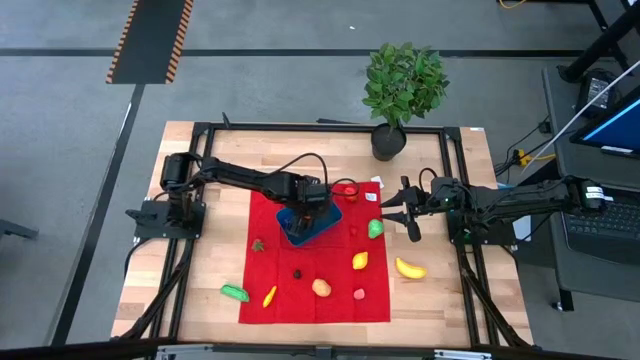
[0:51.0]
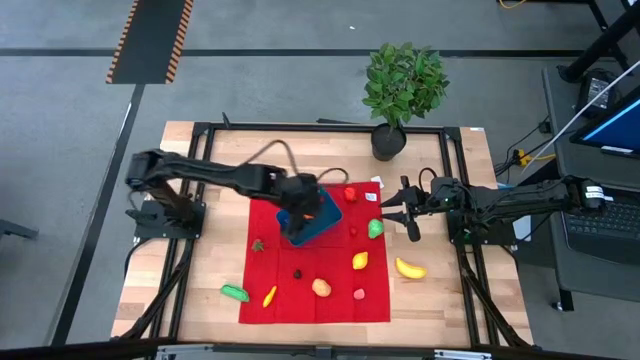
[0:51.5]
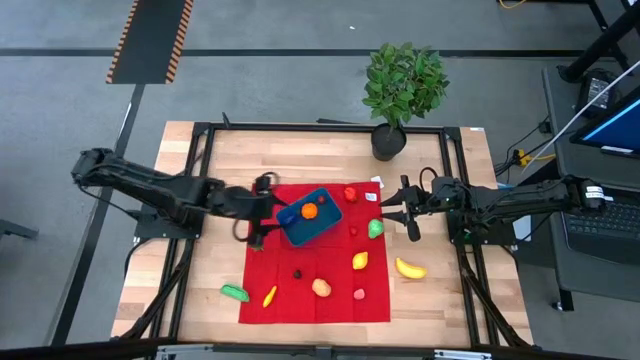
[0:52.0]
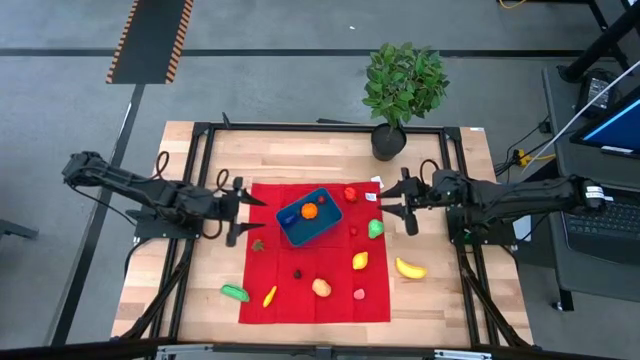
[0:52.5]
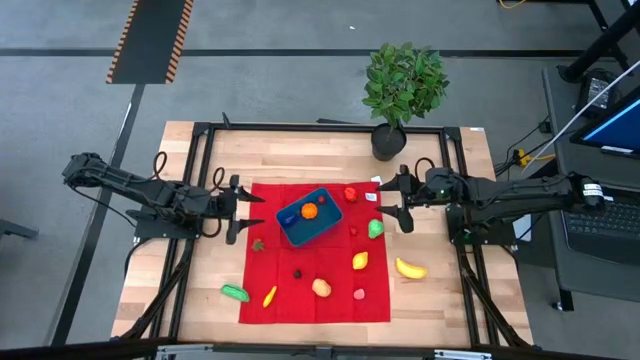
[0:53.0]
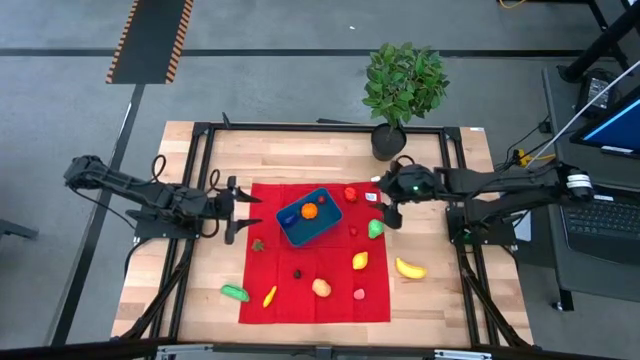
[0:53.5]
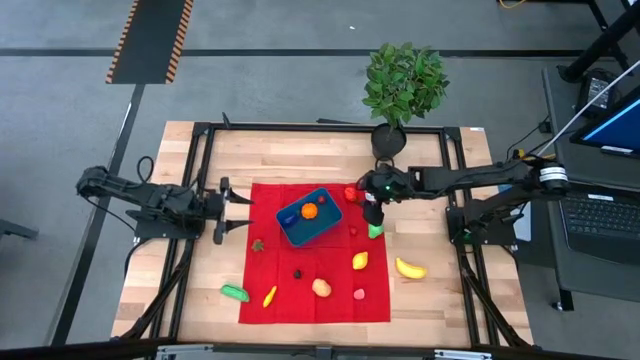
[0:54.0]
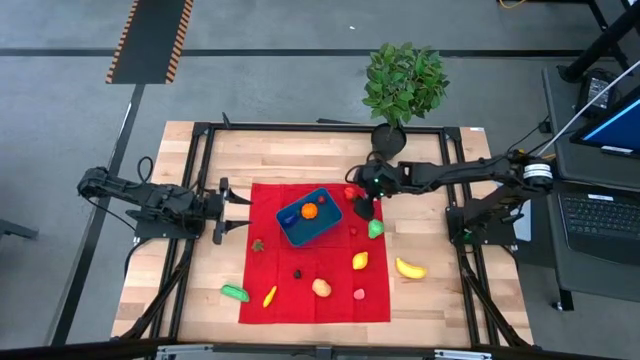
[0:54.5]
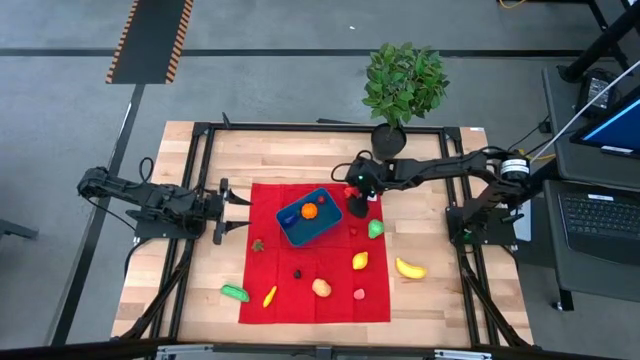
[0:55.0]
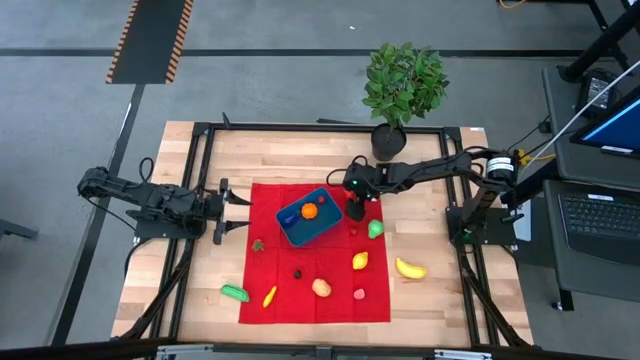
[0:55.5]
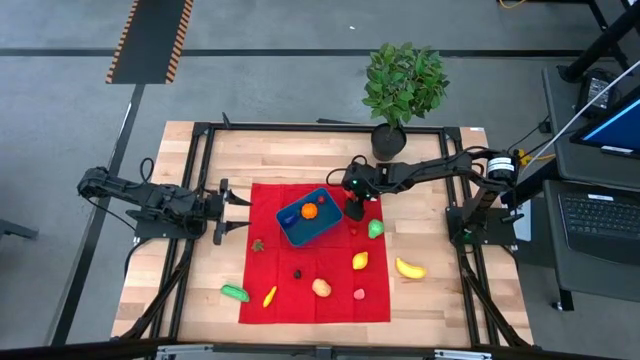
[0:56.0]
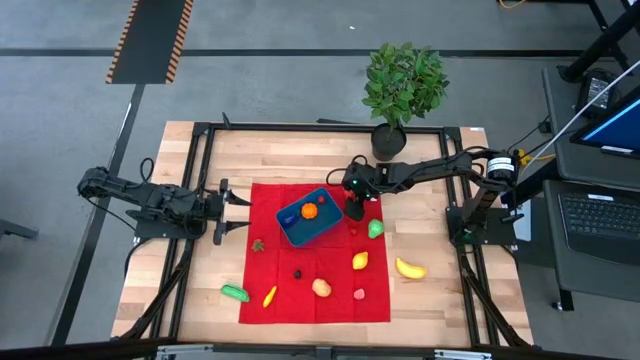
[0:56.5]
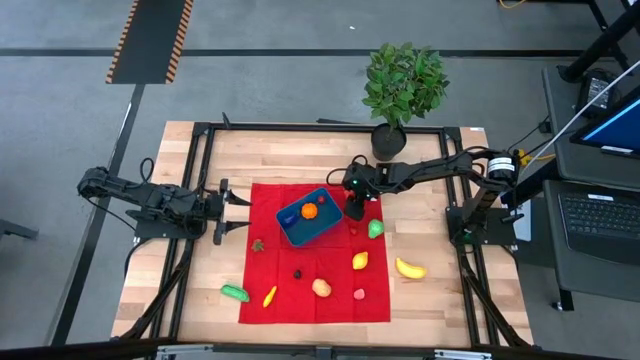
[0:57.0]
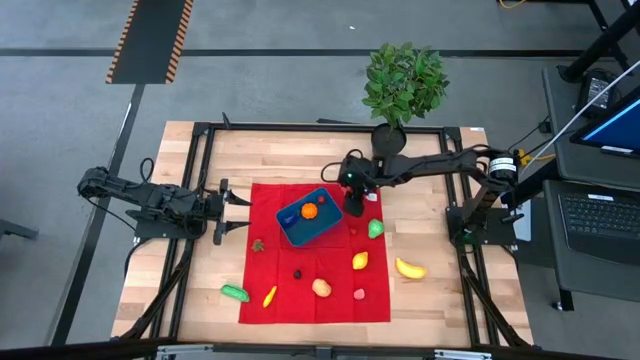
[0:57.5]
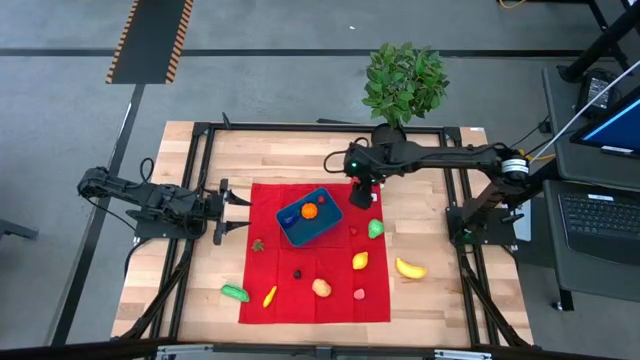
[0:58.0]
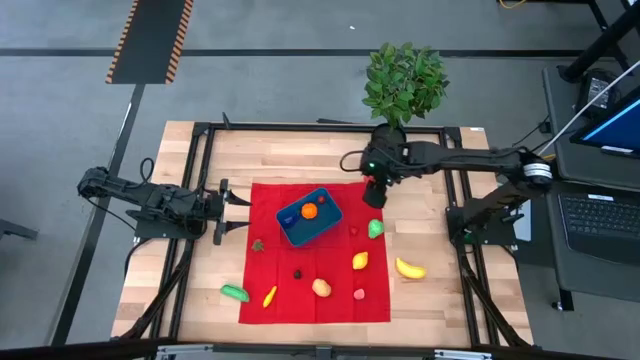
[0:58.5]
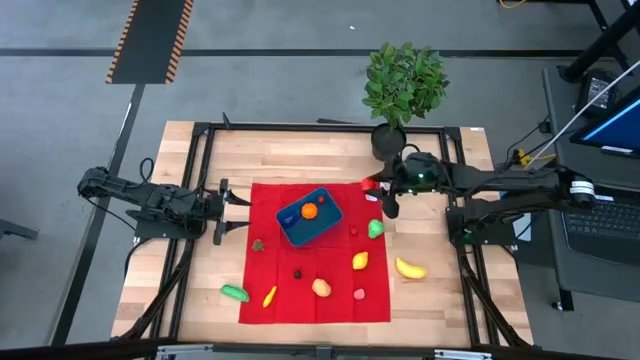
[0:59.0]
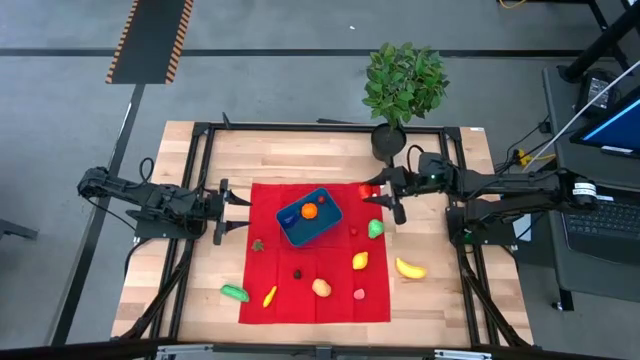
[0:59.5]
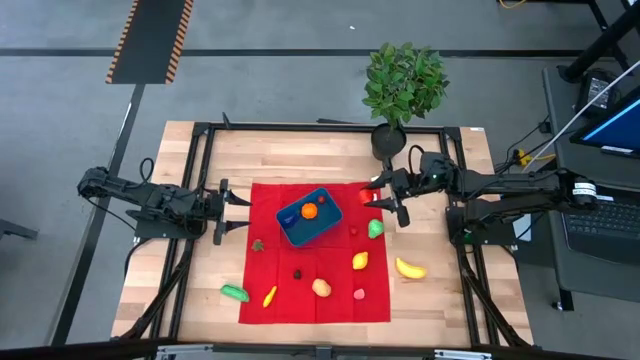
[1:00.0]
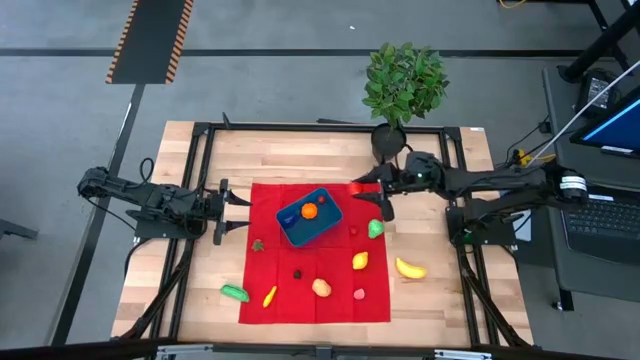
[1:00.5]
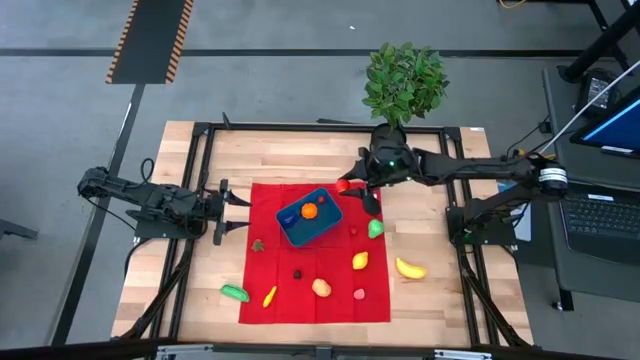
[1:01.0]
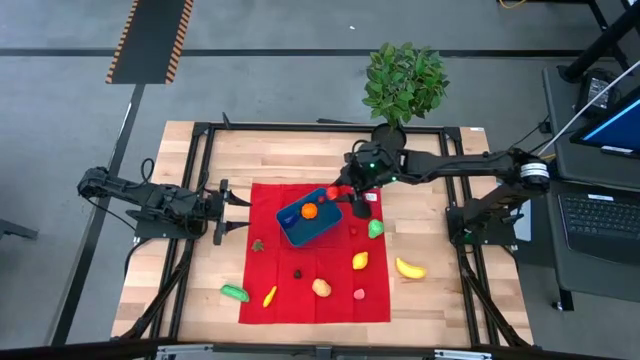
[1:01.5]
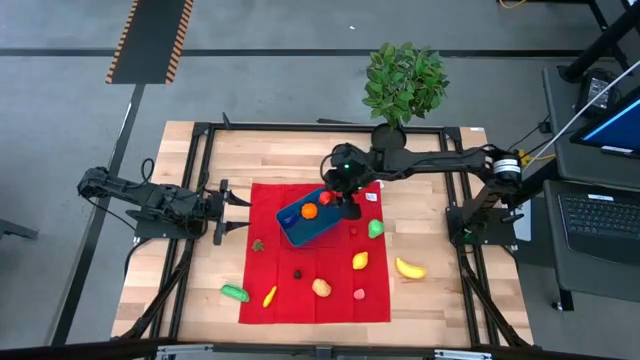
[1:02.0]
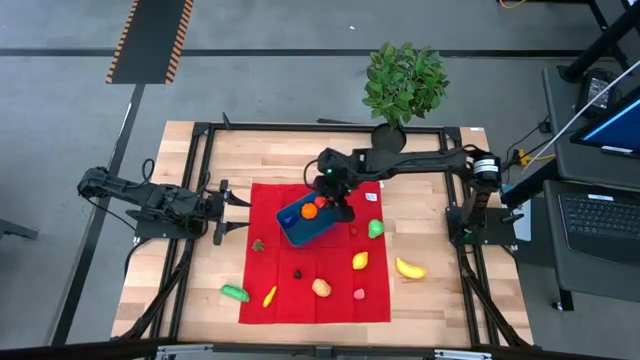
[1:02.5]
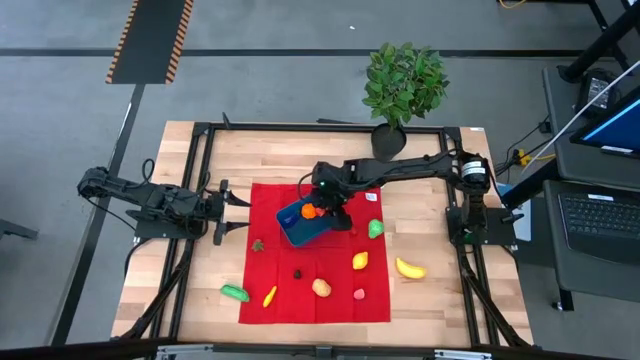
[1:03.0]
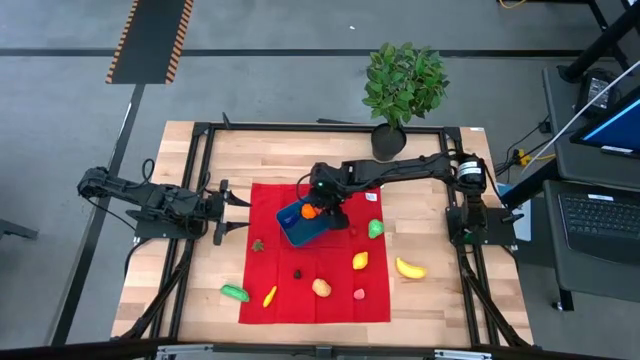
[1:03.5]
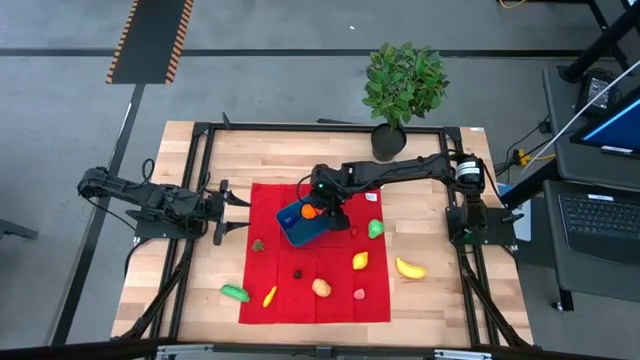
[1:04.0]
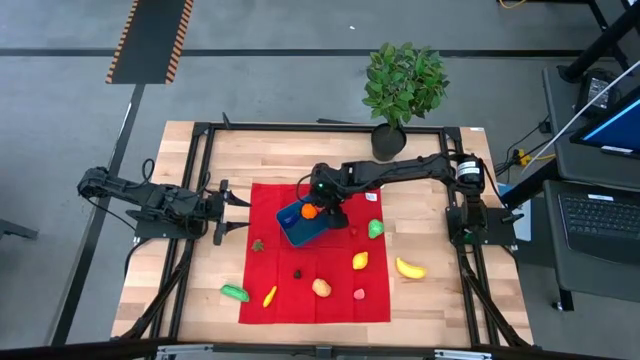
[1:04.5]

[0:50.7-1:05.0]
Task: Pick and placing Produce into tupperware
Put the top strawberry into the blue bin

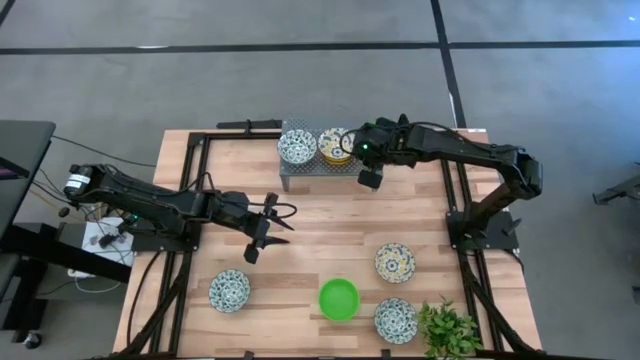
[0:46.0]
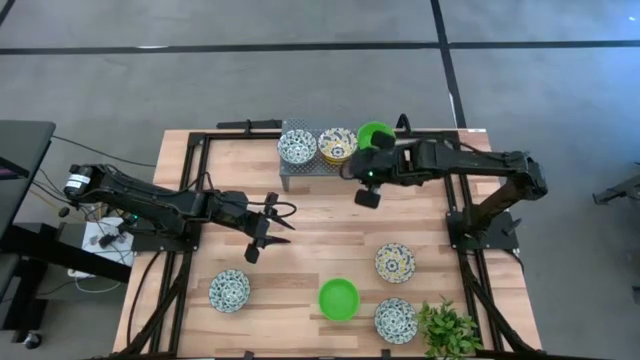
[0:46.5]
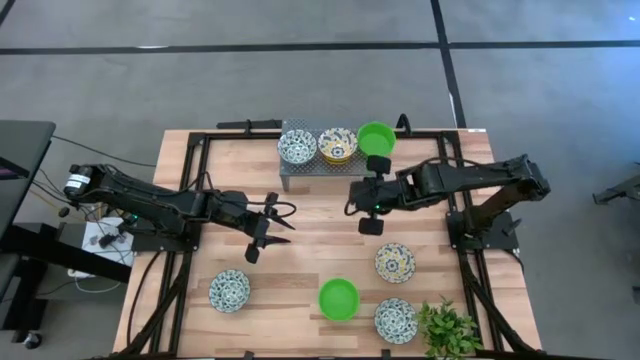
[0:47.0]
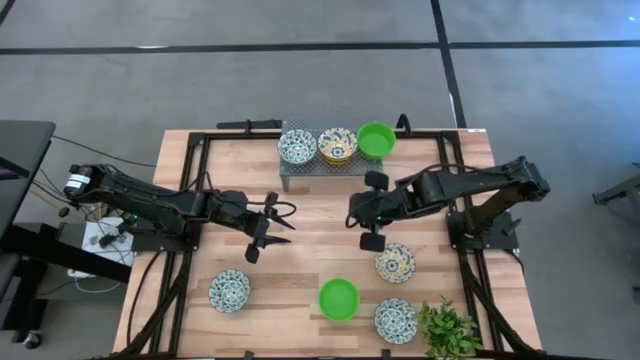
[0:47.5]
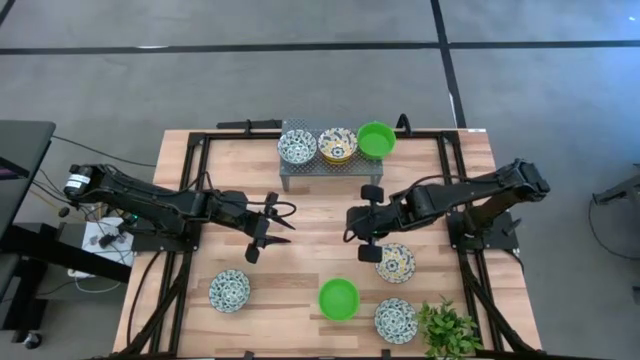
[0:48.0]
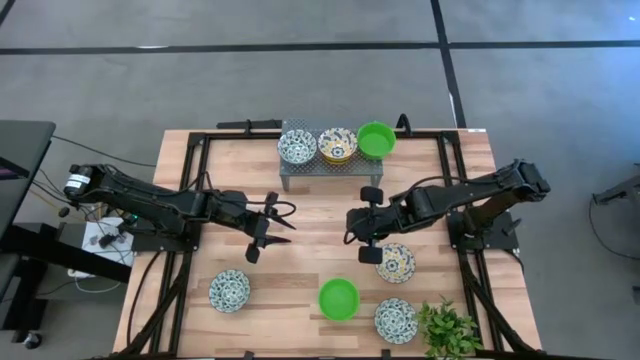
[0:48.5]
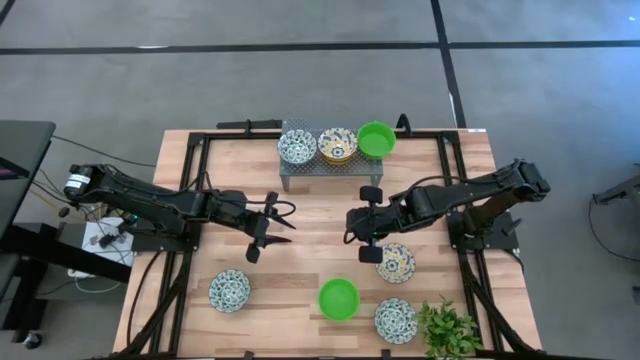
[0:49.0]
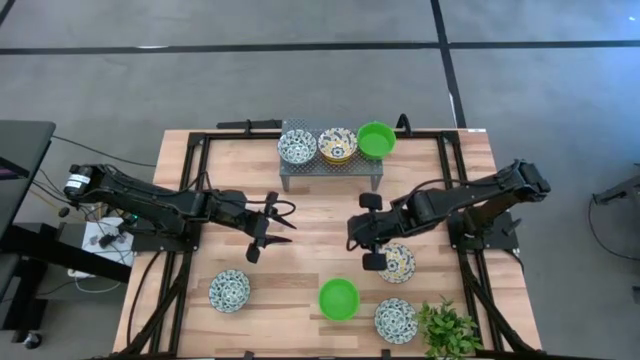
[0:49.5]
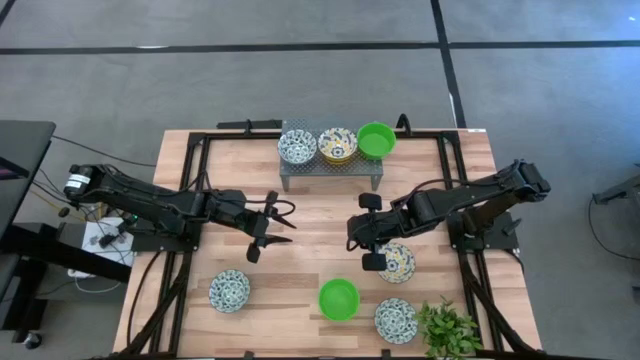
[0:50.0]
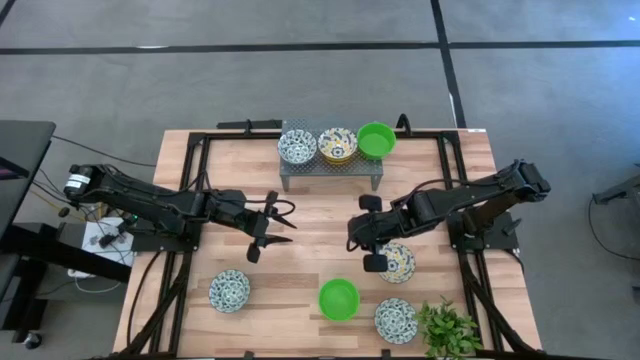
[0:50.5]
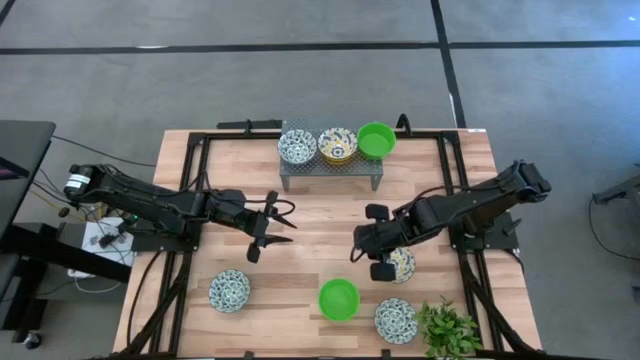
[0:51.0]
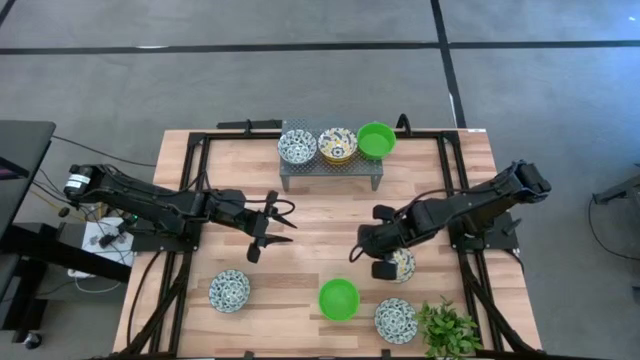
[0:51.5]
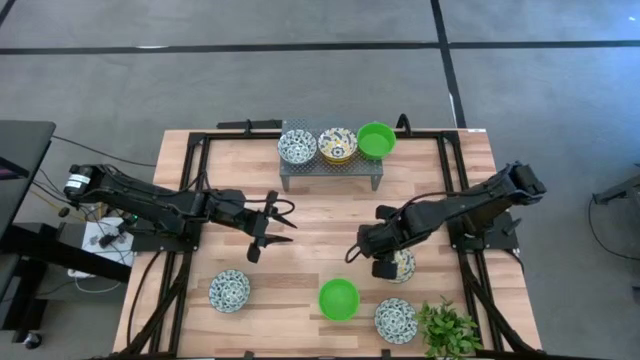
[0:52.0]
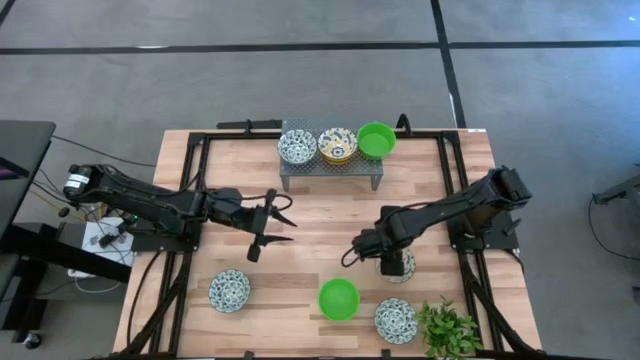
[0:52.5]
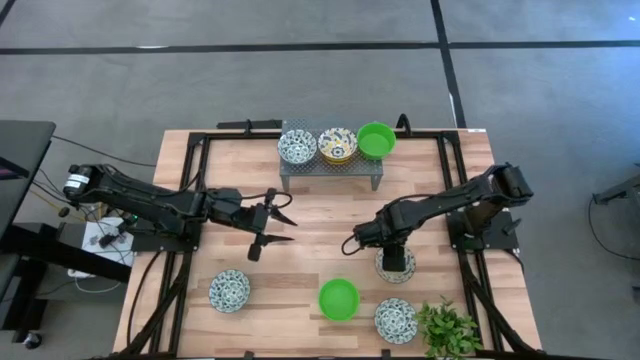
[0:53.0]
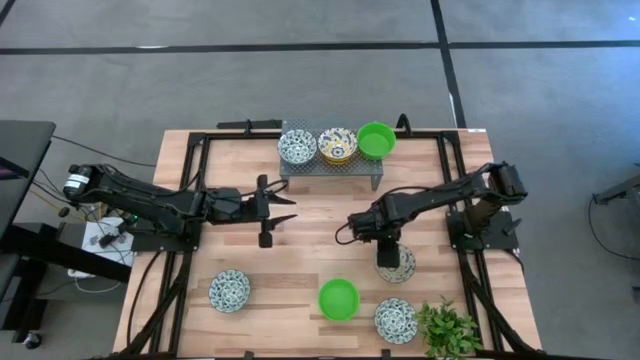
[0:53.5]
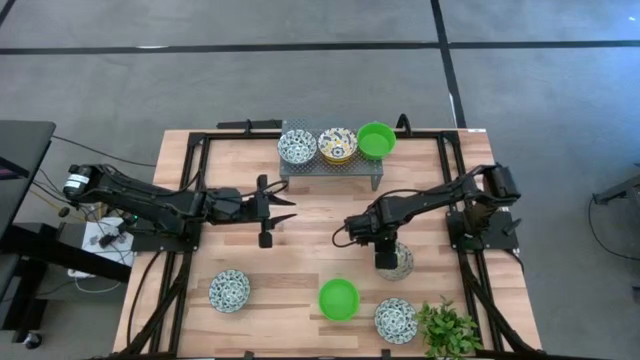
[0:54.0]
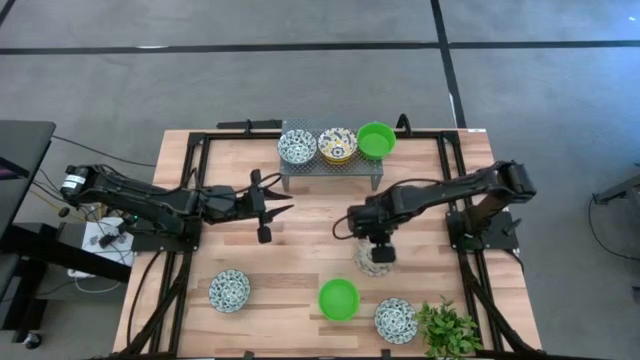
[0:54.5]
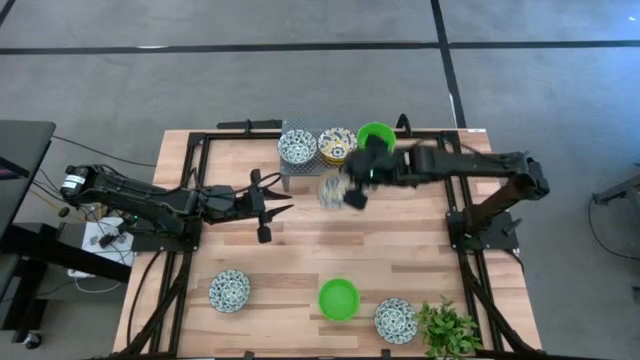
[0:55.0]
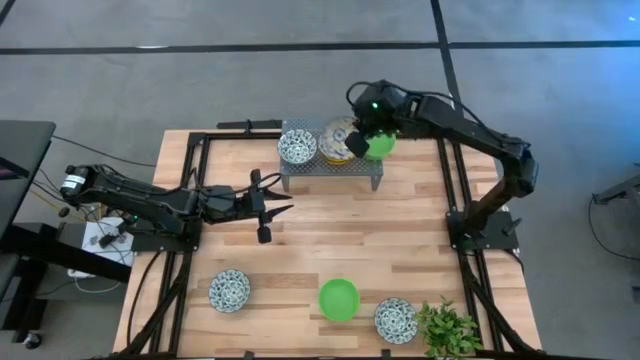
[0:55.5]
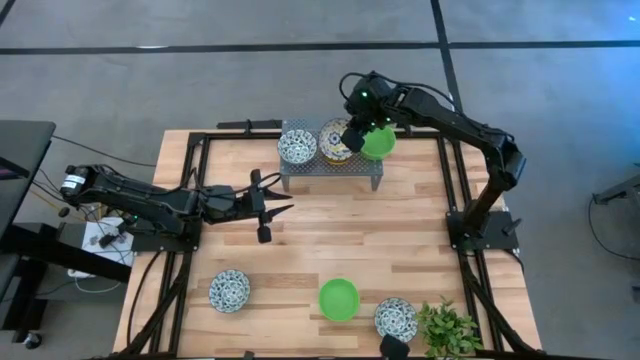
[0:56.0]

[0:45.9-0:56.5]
Task: Pick & Place Mini bowls
Stack the yellow patterned bowl on the yellow patterned bowl on the shelf
